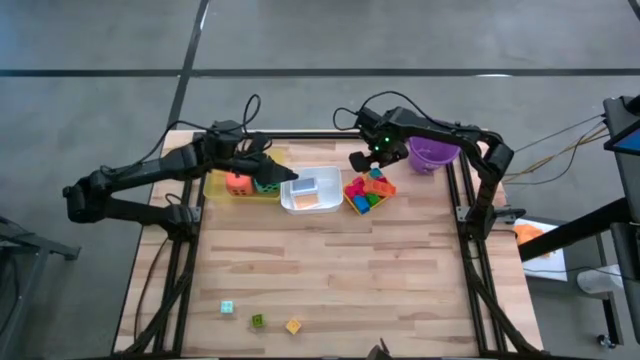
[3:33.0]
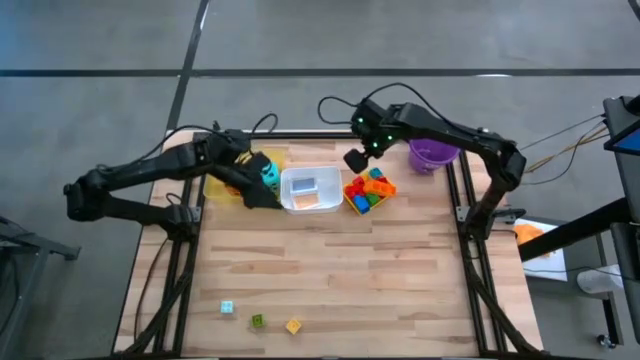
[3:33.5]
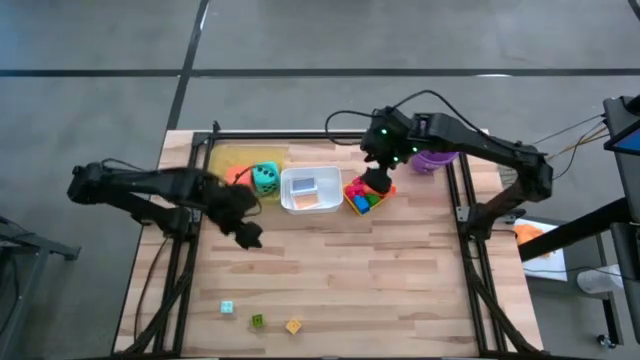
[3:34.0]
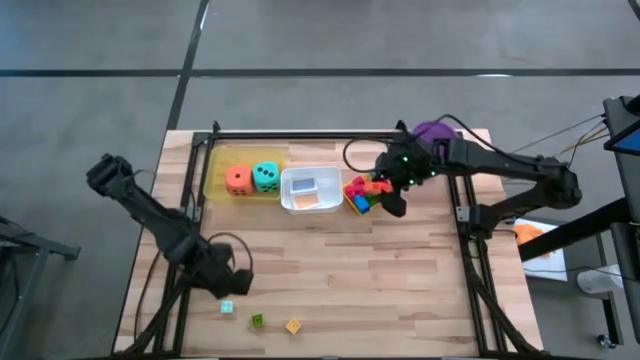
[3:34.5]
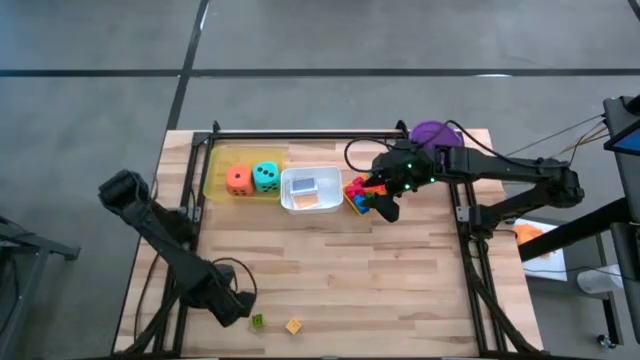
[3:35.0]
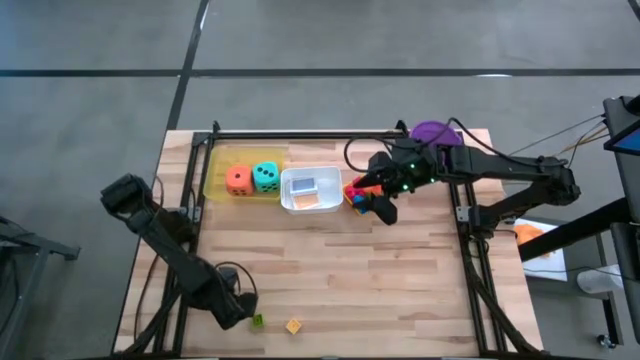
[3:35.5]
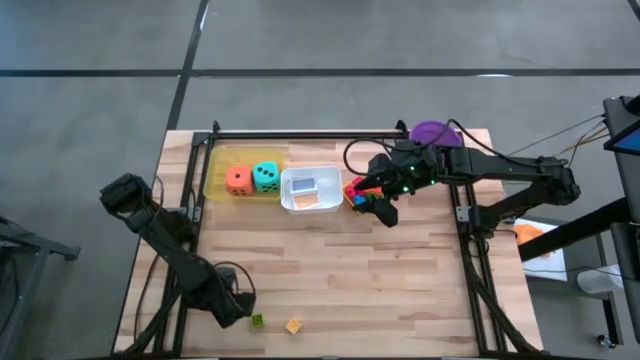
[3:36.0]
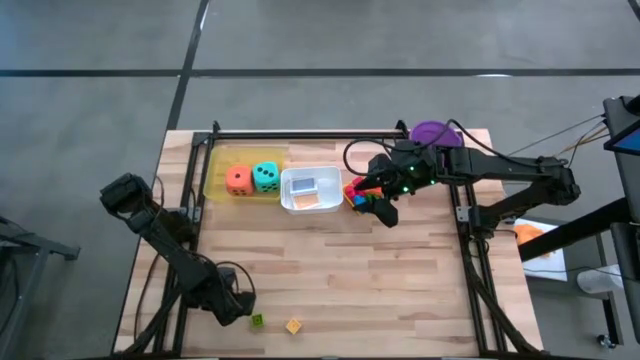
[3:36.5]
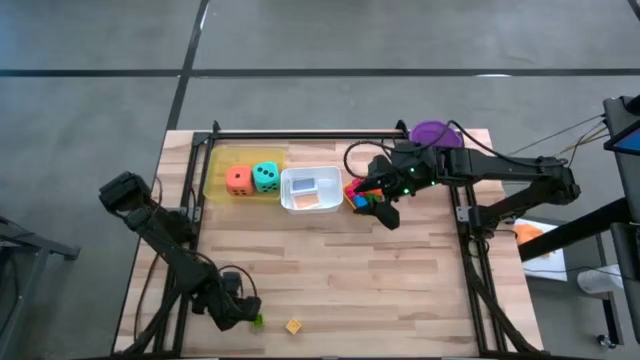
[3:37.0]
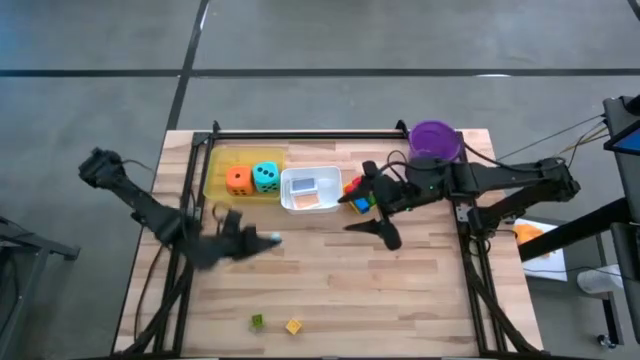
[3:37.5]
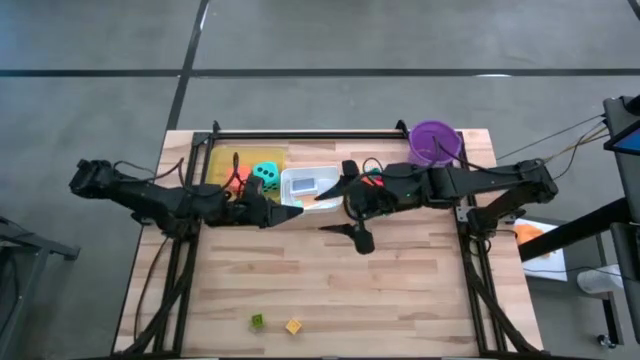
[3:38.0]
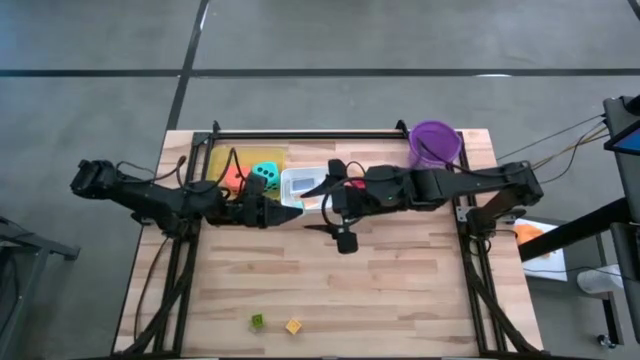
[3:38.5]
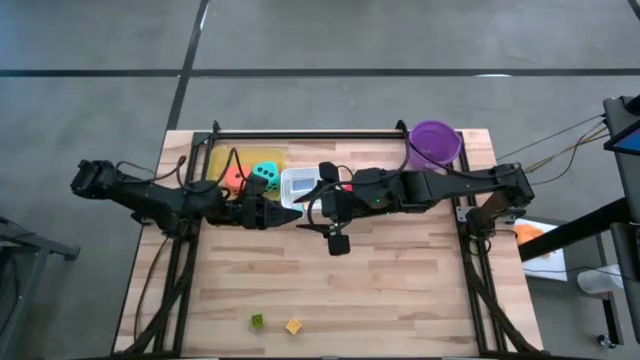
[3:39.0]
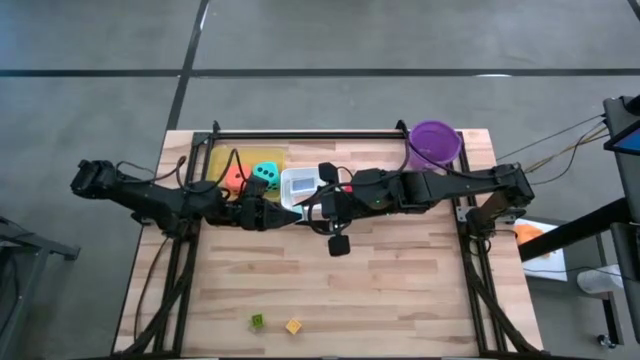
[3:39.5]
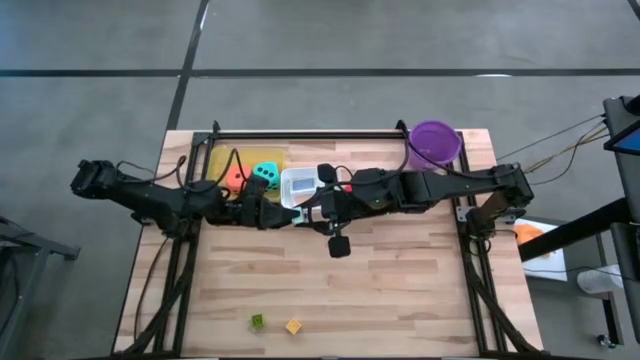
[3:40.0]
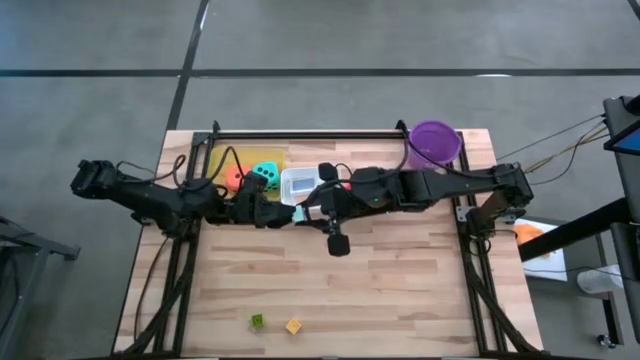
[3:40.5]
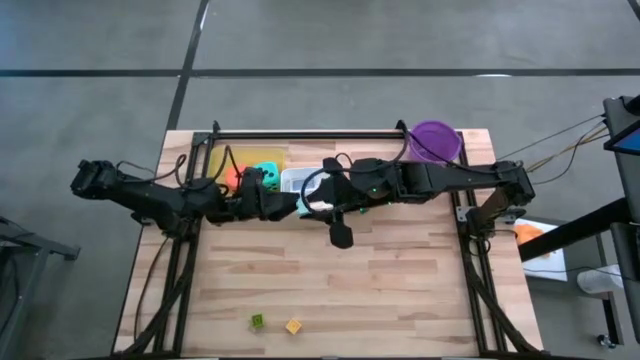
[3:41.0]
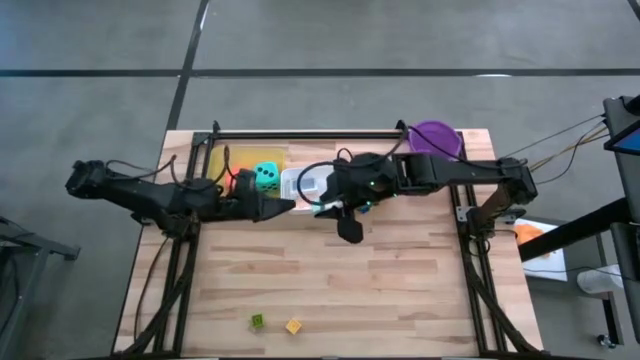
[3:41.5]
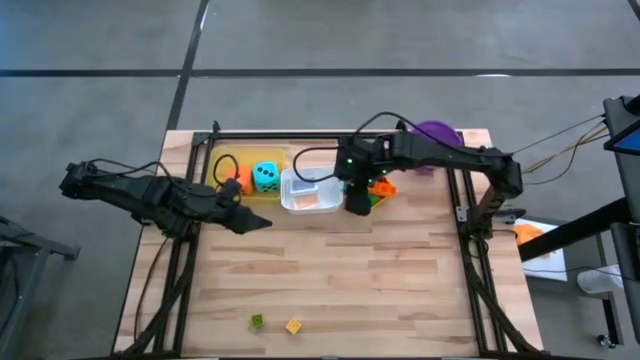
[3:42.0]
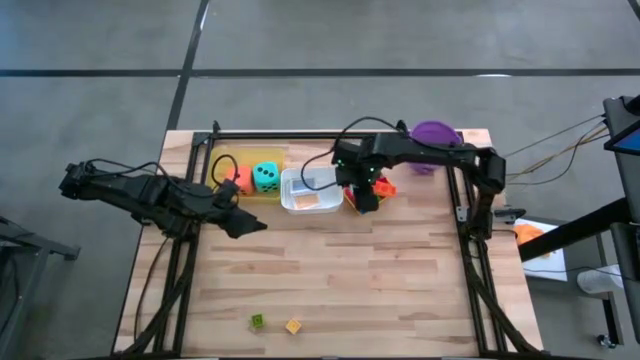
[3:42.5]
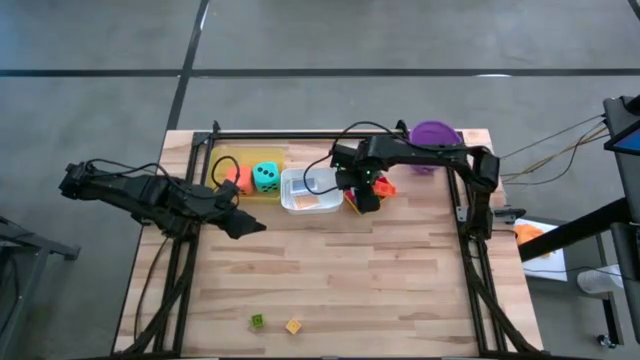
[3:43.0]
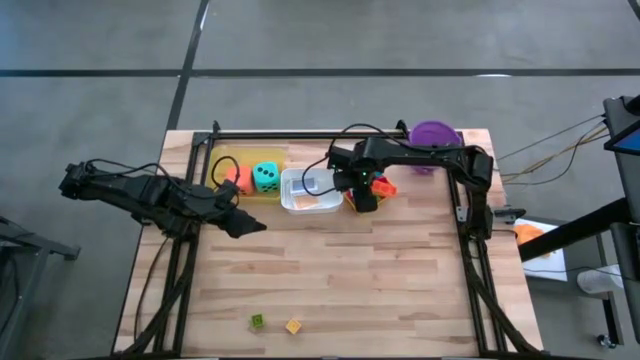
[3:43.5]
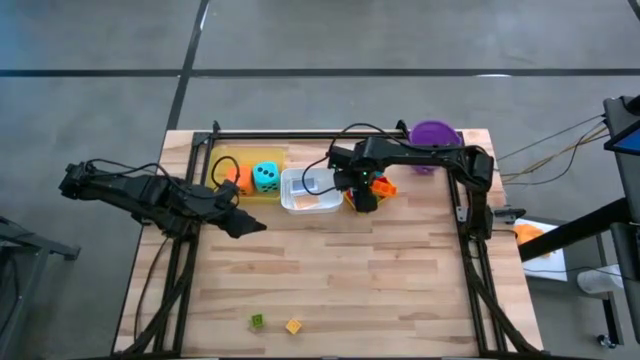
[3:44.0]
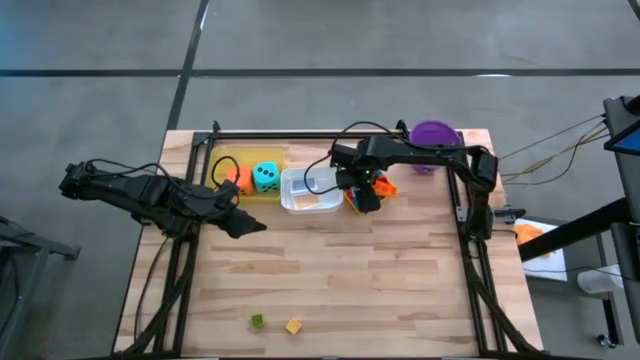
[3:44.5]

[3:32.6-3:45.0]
Task: Pick & Place Toys
Put the light green game piece into the yellow bin

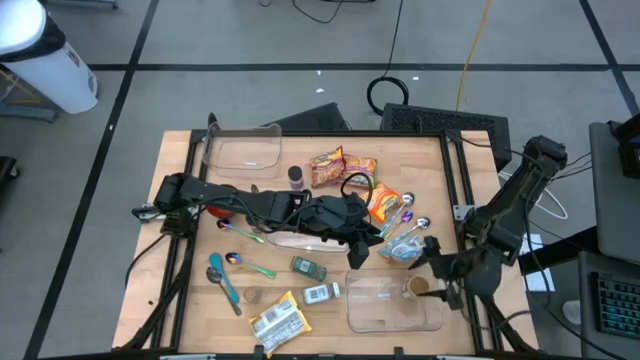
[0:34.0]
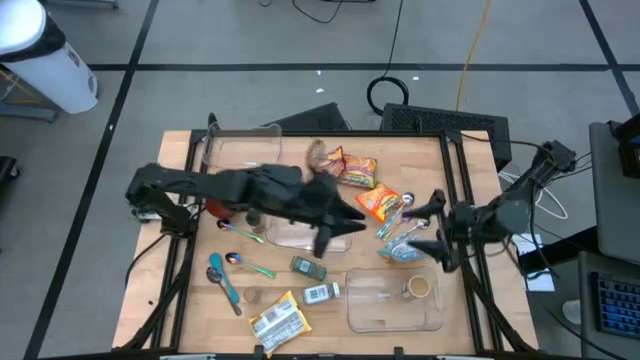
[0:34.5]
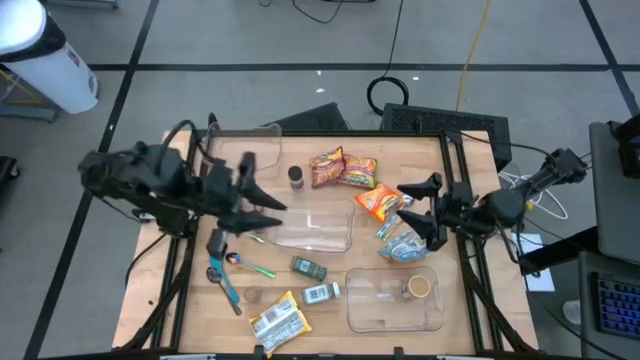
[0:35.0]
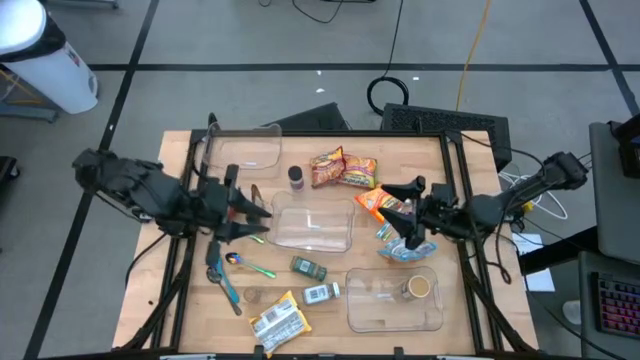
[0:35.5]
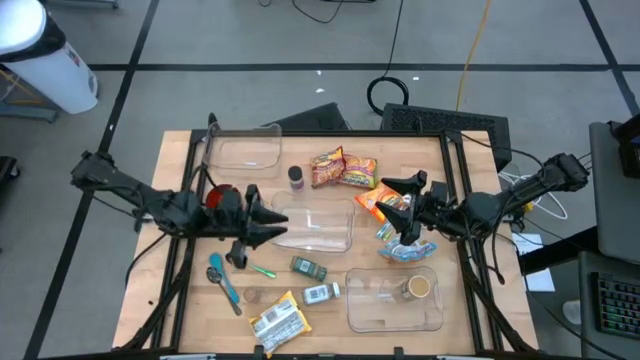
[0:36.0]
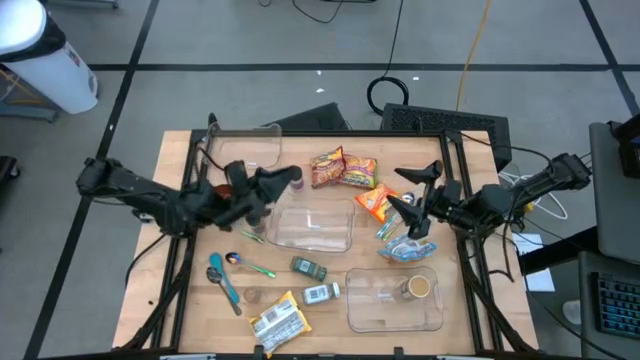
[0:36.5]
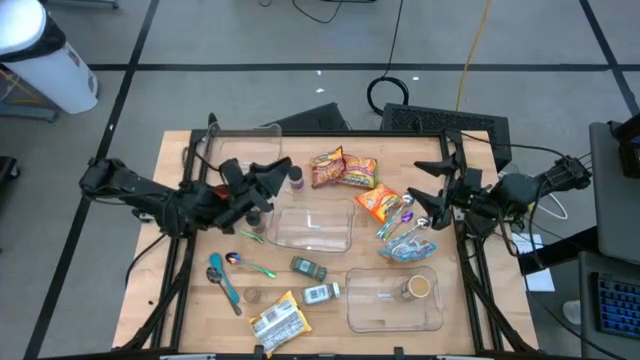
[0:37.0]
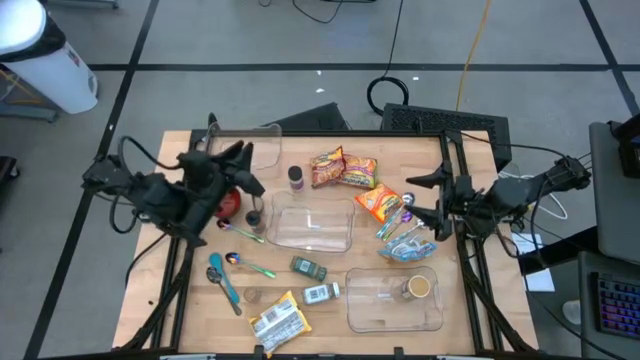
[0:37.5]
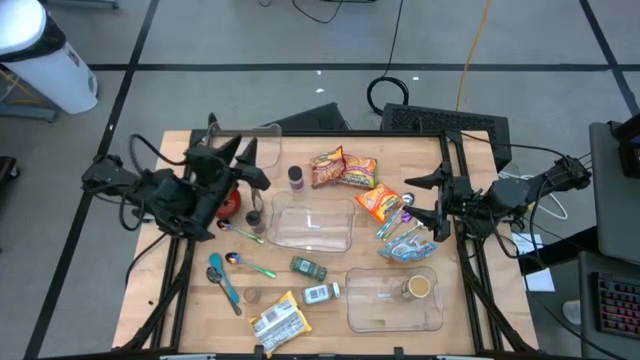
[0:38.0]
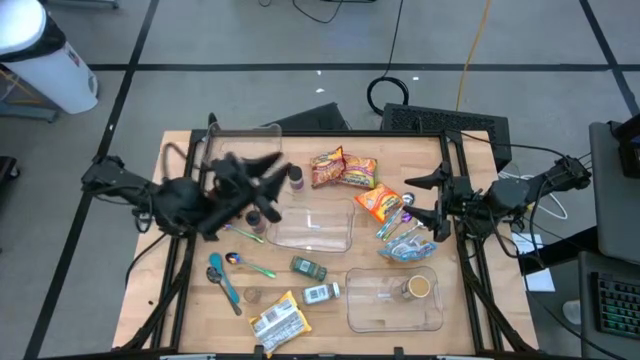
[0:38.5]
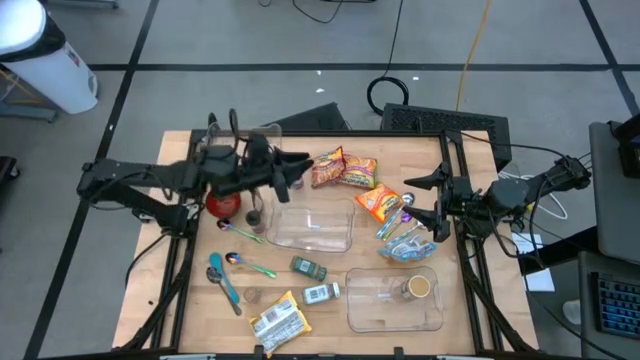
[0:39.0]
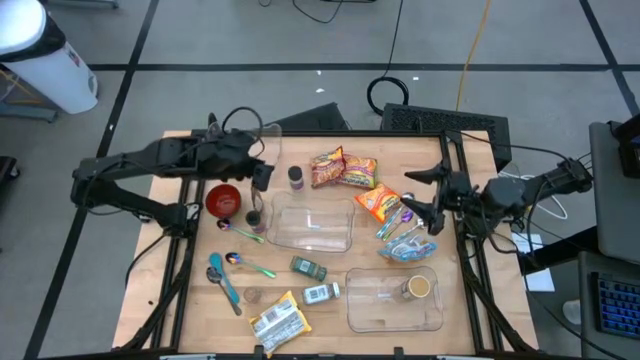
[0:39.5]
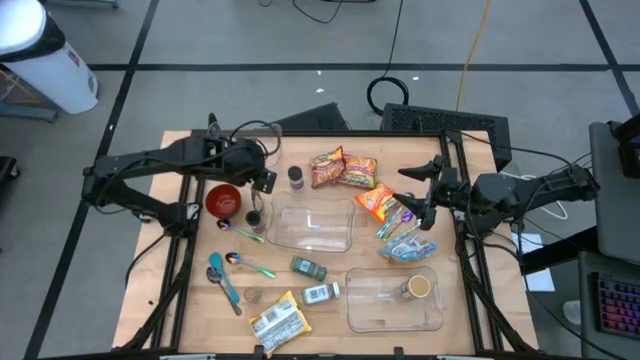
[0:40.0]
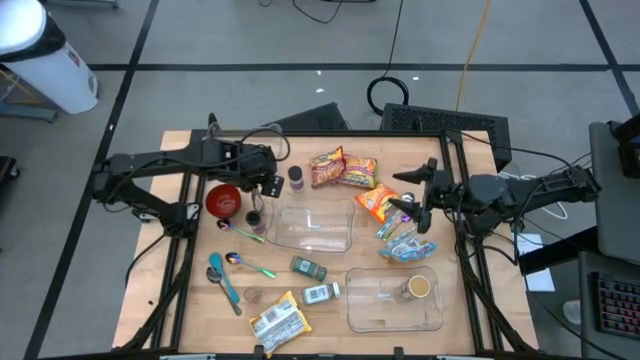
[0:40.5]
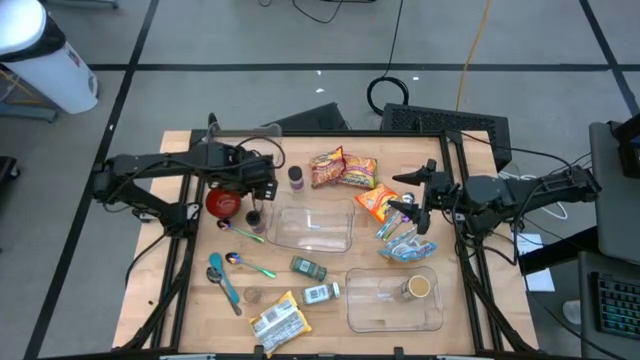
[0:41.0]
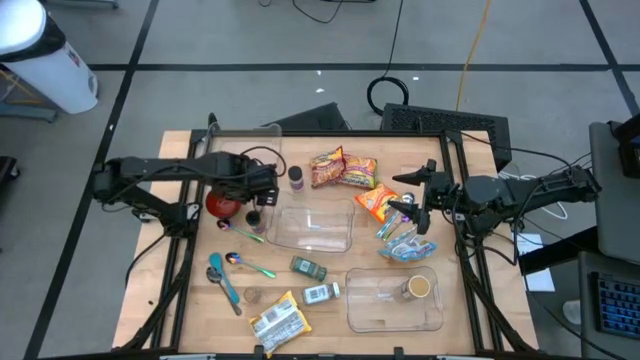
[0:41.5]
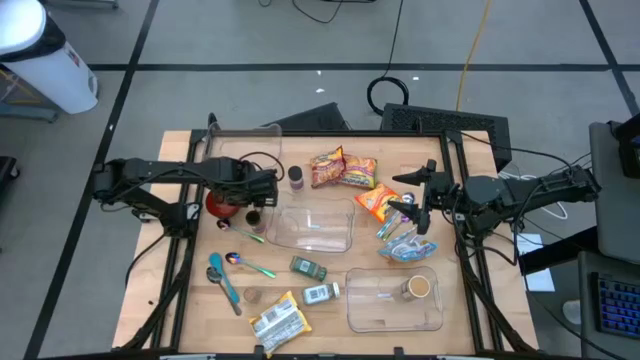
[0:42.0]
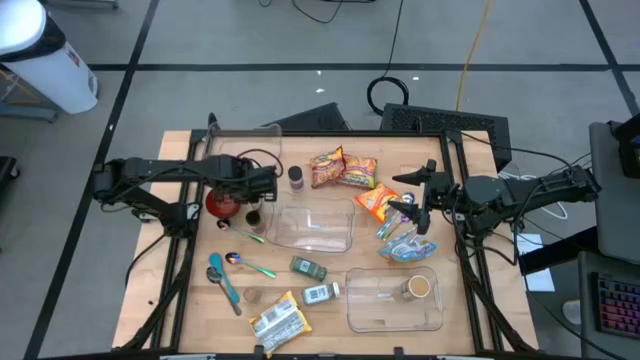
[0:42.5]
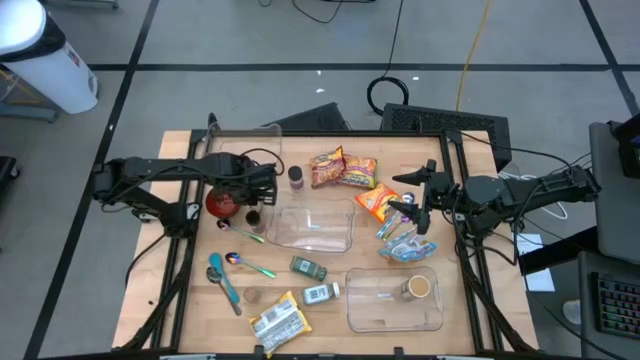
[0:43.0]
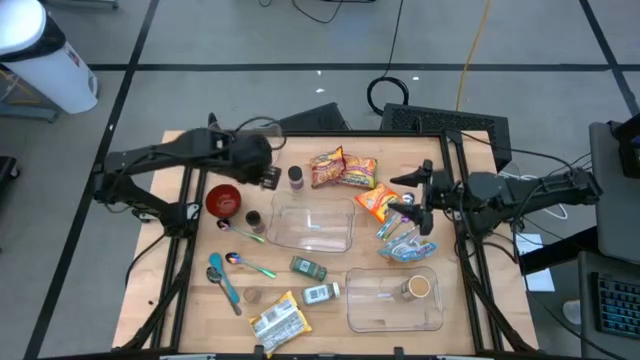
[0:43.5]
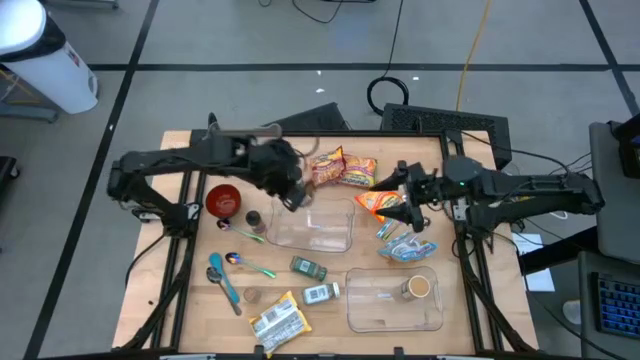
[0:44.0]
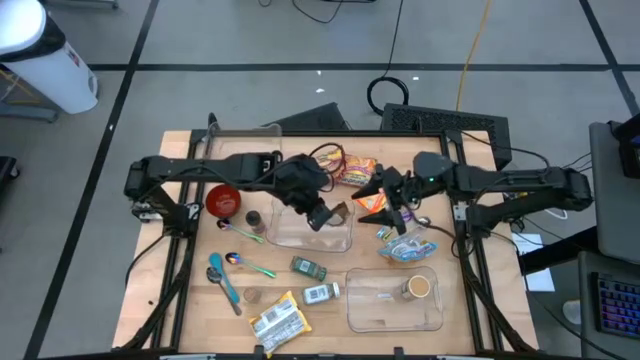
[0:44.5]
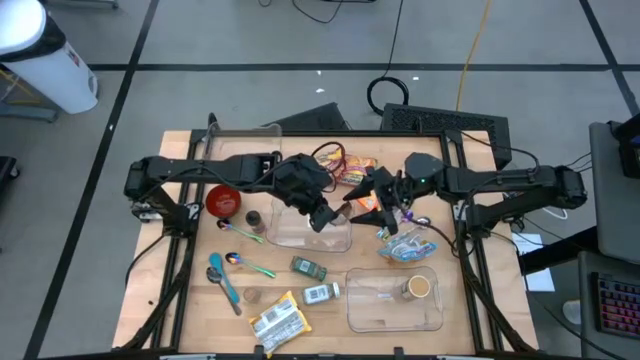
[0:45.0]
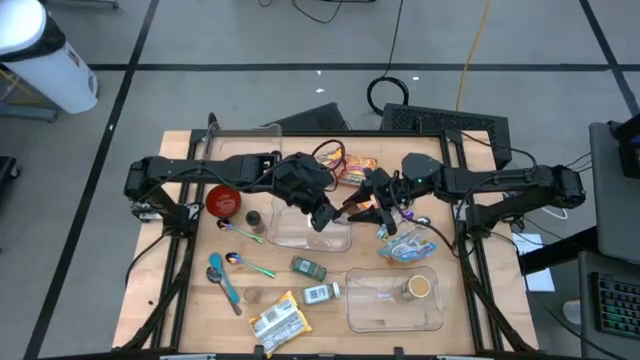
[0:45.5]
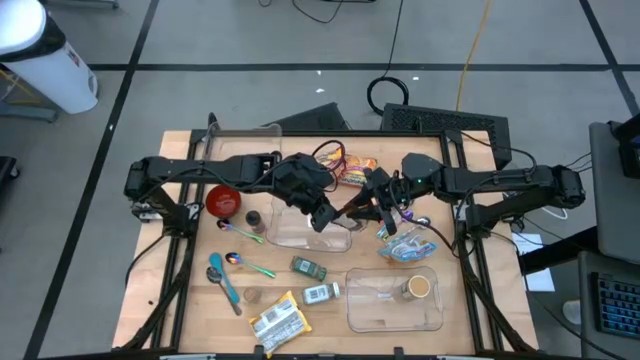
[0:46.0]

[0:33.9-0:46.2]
Task: Pick & Place Food Item
Put the orange seasoning pack into the bottom transparent bin
